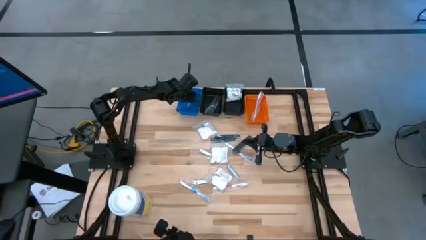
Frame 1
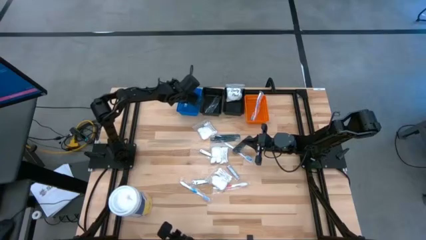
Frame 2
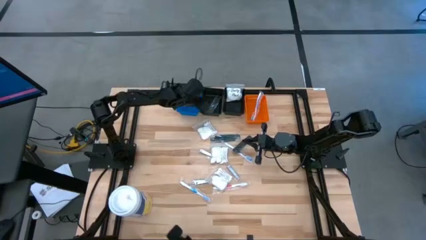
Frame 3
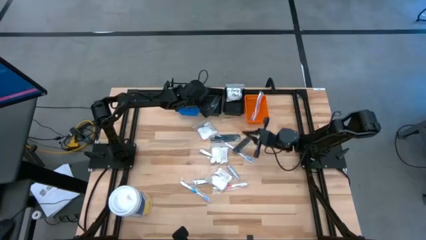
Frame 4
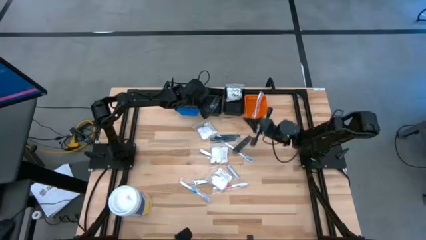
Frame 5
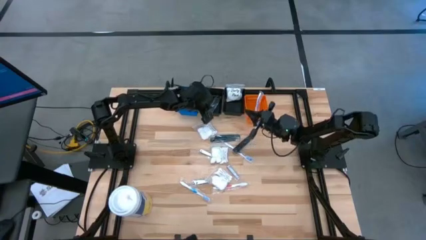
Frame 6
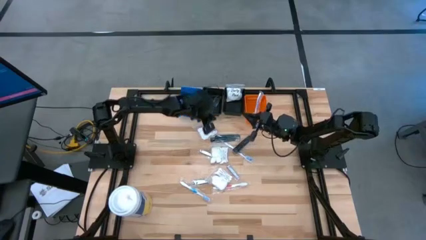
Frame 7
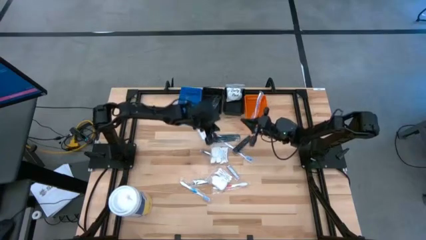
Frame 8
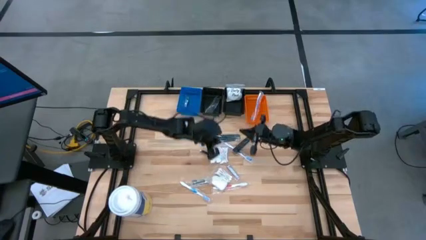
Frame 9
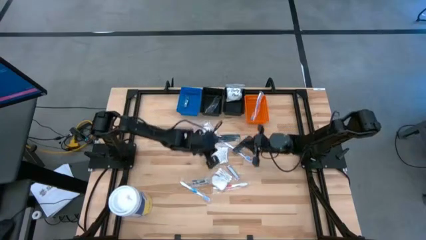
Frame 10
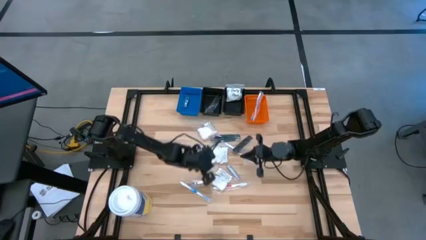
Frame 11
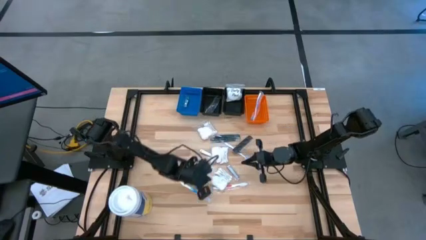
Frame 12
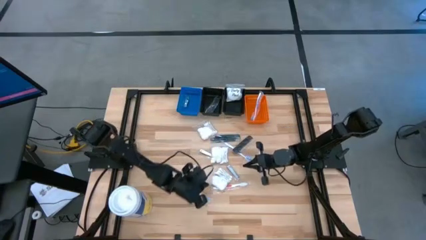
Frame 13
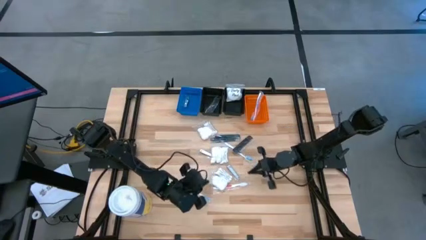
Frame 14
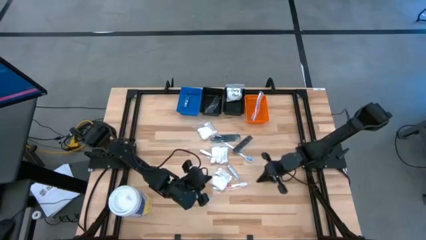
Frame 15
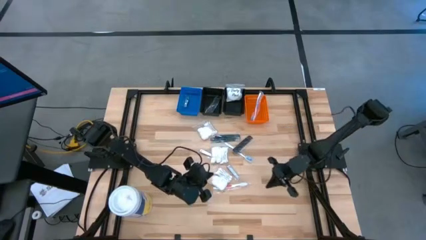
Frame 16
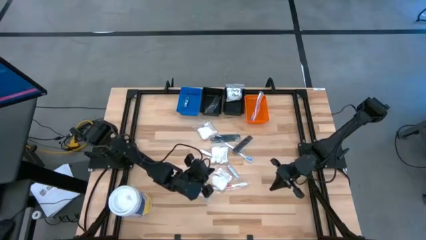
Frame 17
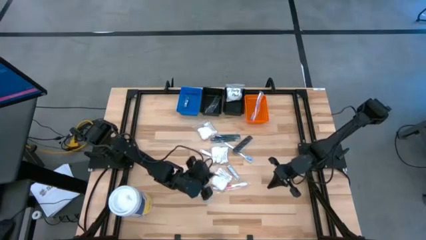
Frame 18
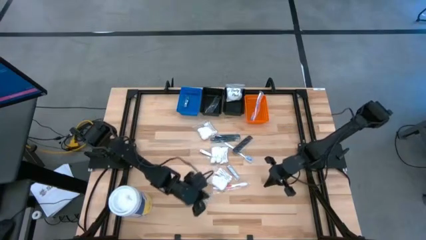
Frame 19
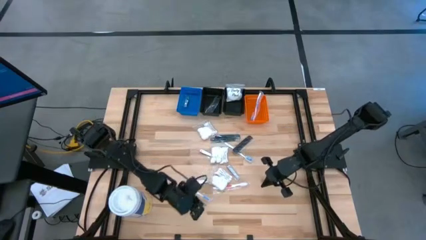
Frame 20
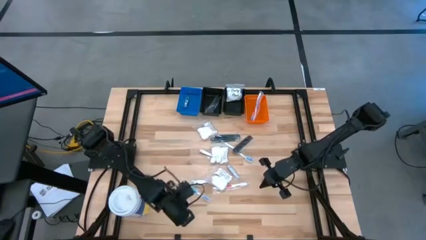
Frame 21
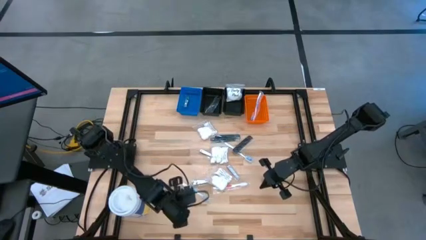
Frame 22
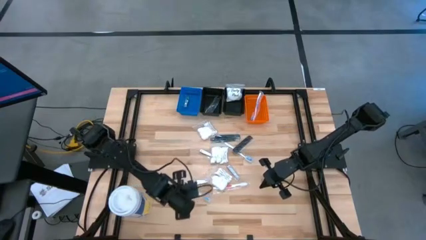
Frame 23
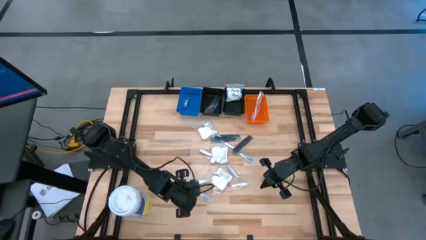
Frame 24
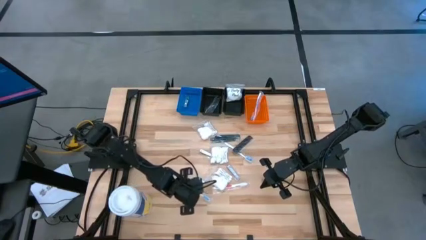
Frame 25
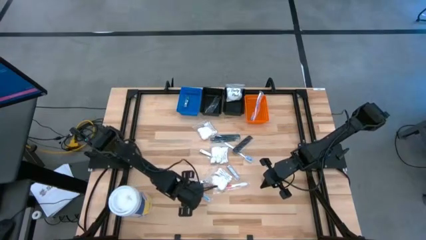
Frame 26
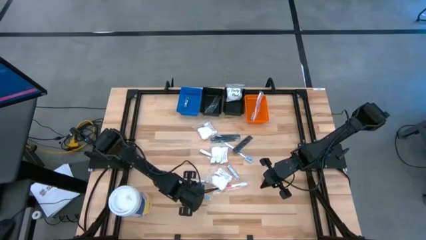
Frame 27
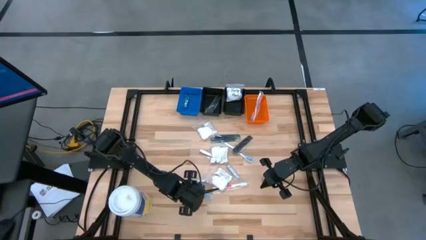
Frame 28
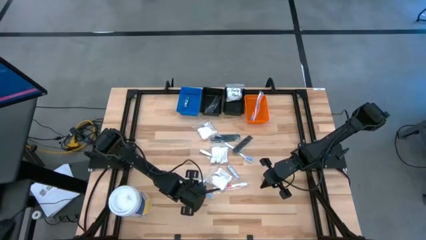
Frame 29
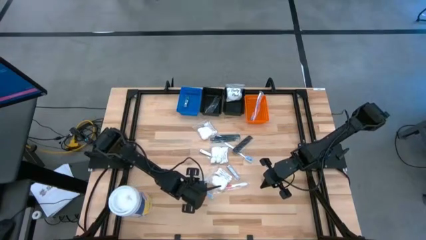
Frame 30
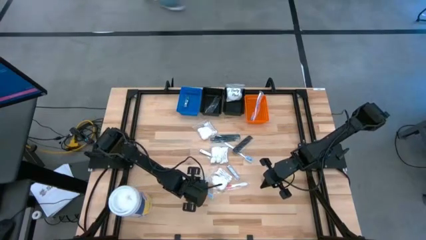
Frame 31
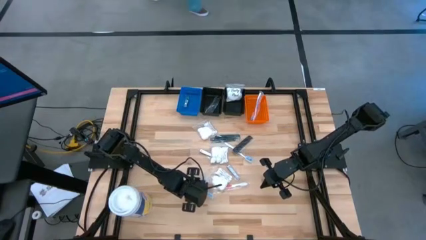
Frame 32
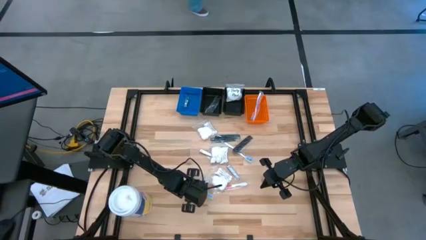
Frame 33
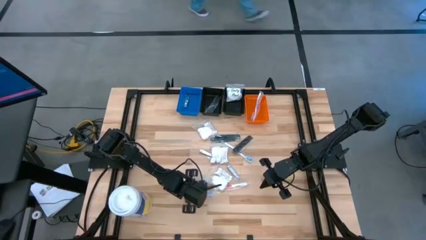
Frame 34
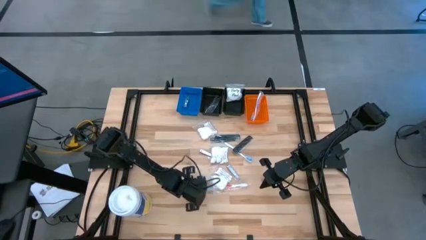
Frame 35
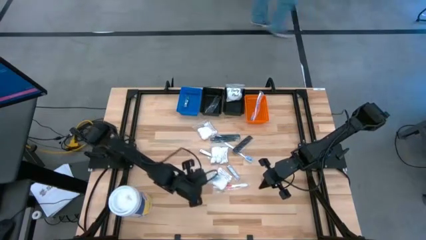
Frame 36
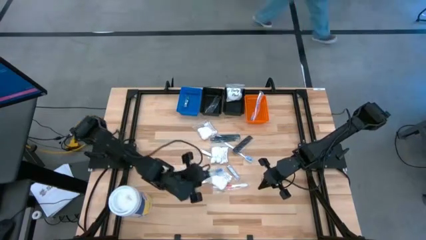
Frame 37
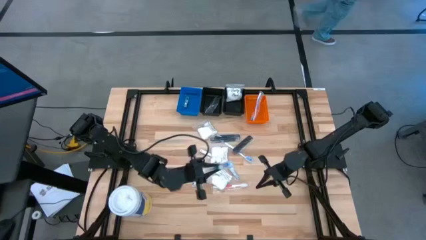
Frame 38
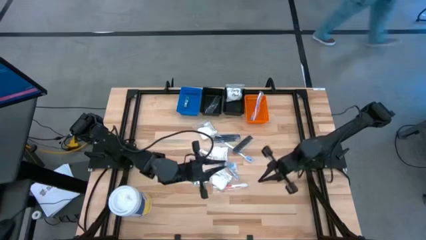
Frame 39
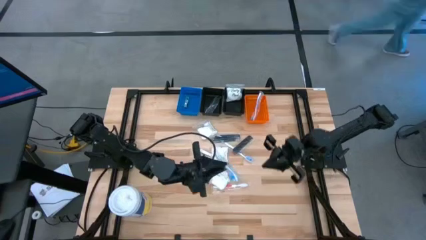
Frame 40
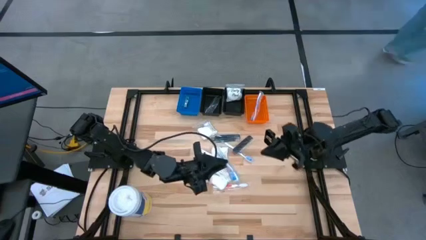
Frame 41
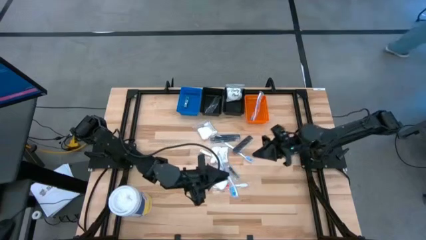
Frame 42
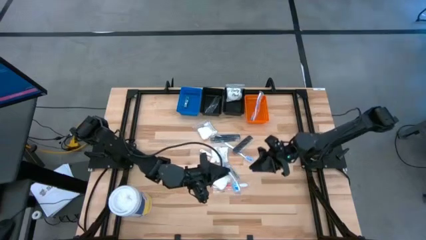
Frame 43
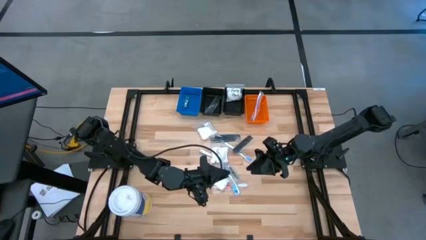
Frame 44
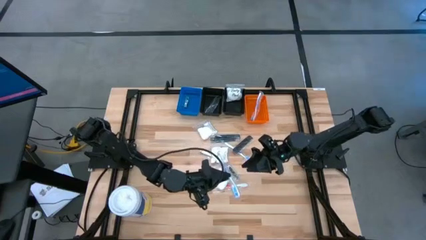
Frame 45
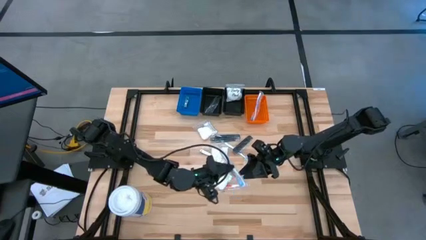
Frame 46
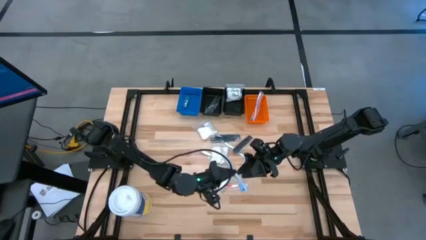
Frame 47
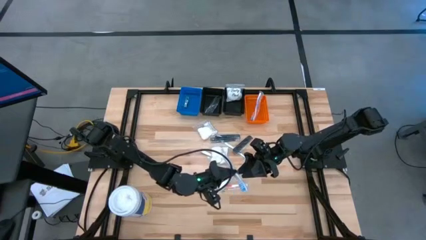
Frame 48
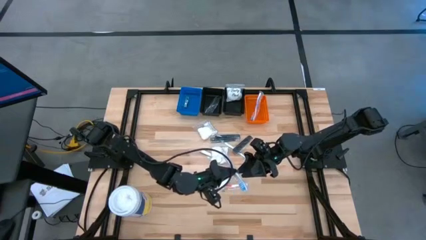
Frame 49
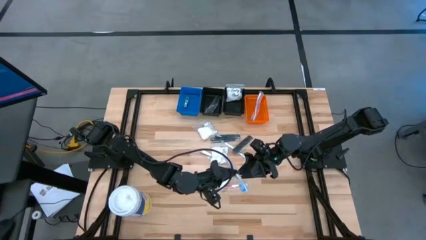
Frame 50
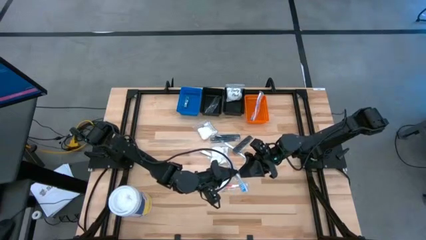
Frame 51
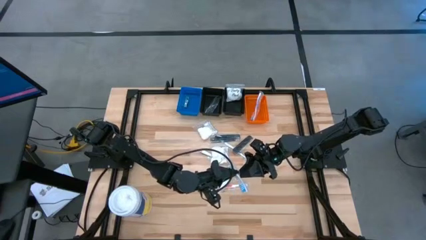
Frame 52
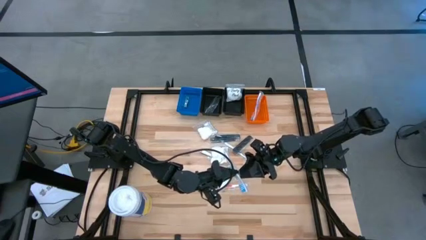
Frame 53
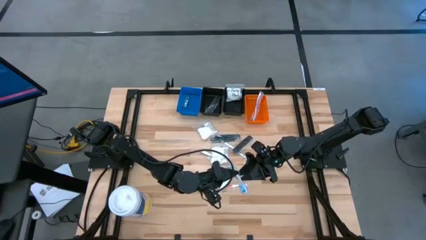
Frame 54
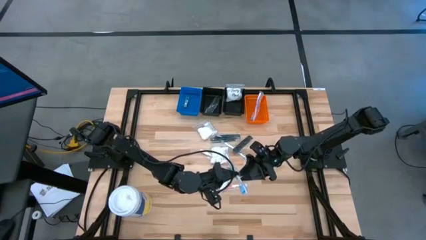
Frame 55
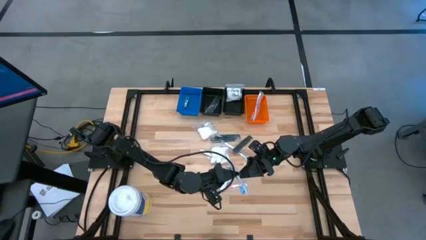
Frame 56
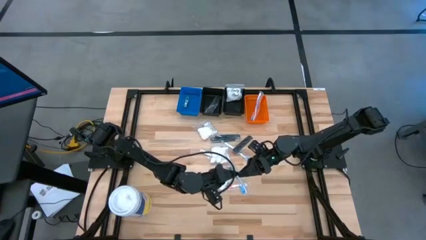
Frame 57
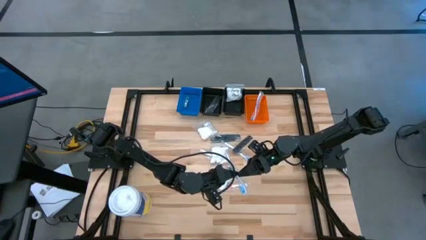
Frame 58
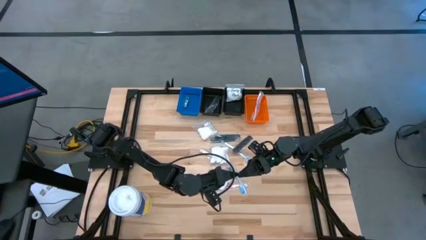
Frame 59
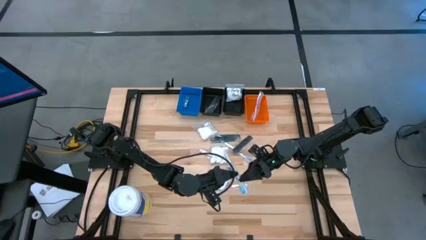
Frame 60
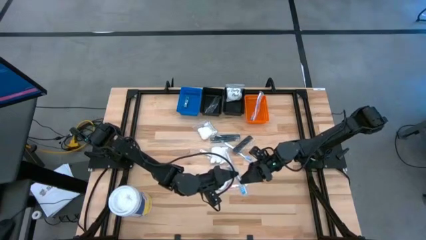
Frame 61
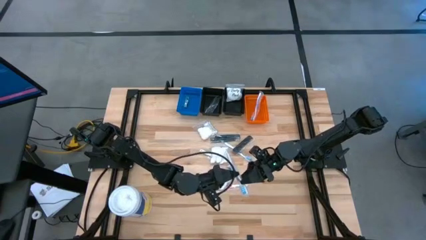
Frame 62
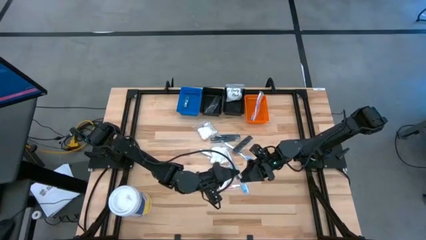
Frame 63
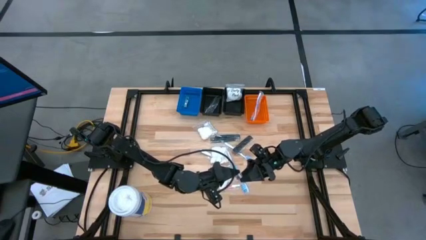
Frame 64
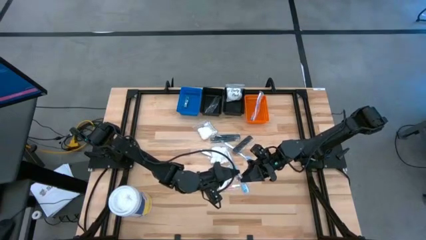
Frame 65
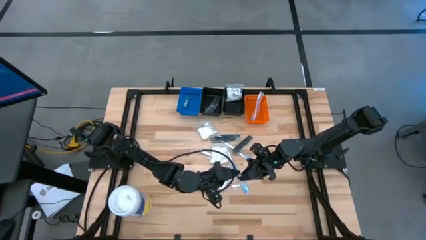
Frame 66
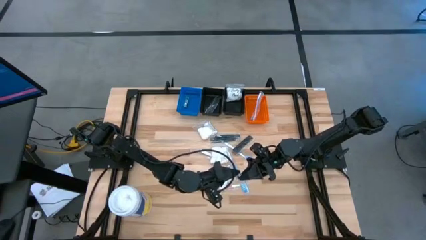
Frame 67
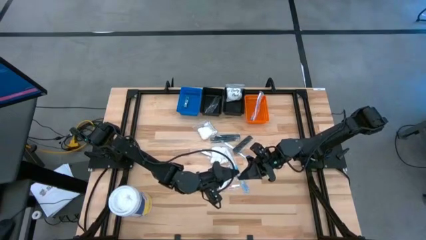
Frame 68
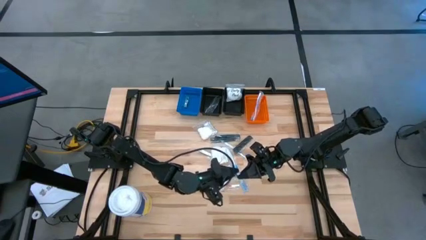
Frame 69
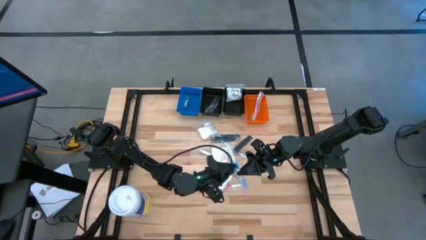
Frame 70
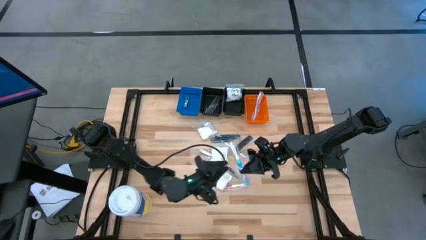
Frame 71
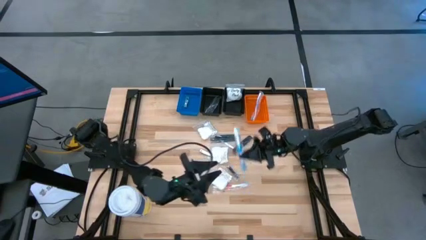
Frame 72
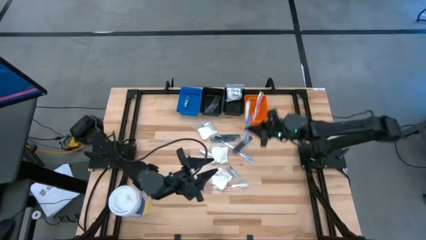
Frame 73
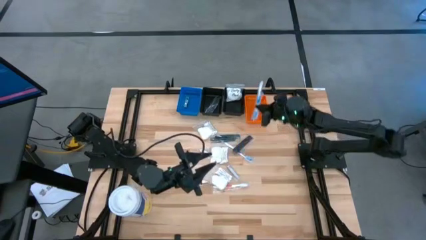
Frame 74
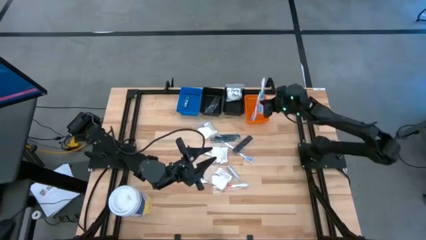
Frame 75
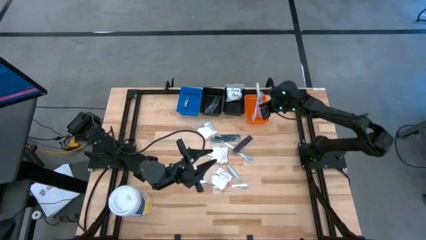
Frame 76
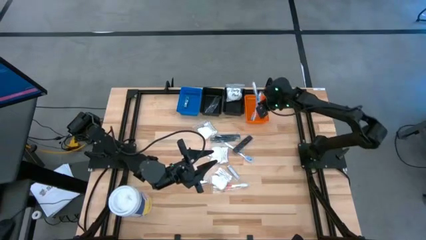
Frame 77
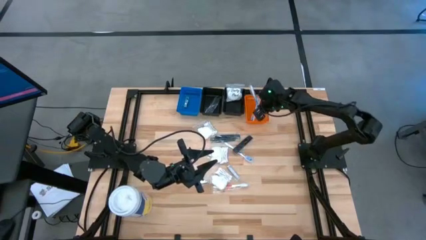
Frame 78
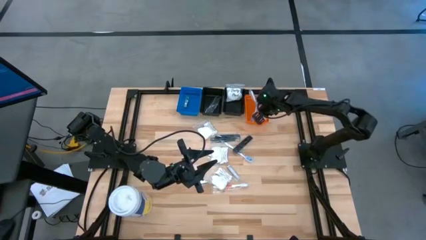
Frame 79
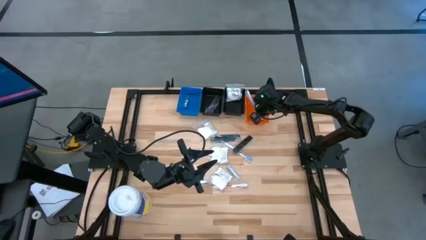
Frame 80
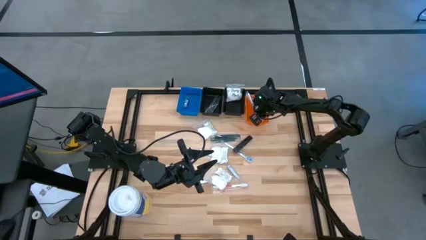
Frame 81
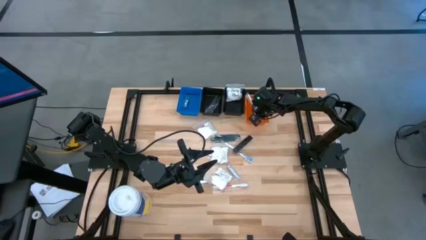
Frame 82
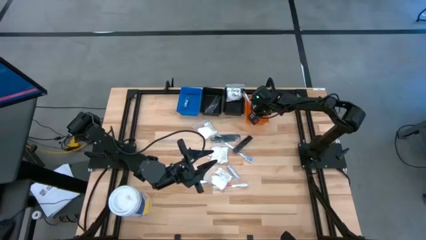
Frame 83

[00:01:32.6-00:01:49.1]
Task: Pick & Place Travel size toiletries
Put the blue toothbrush into the orange bin
